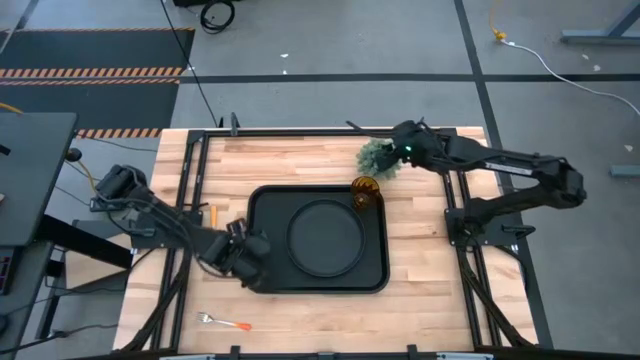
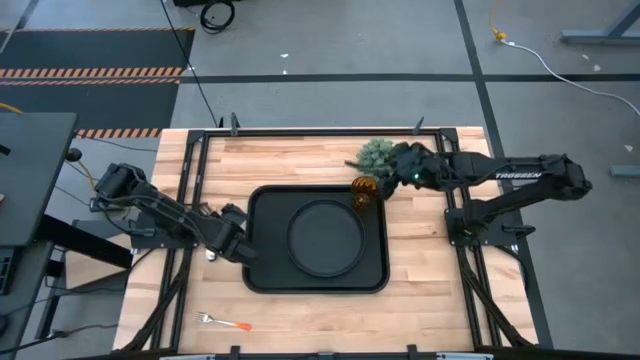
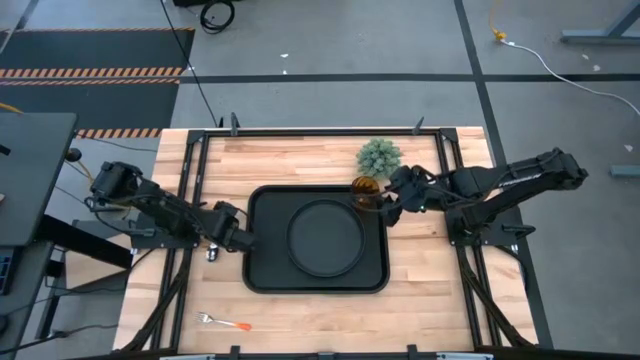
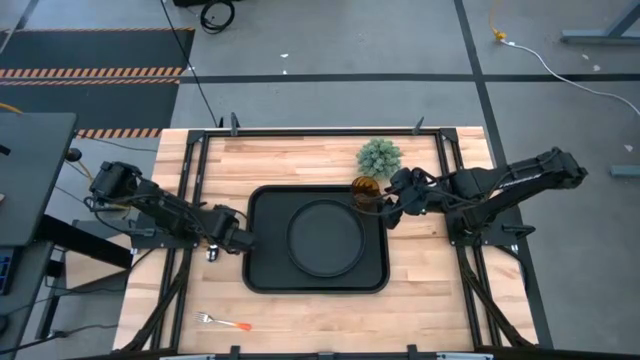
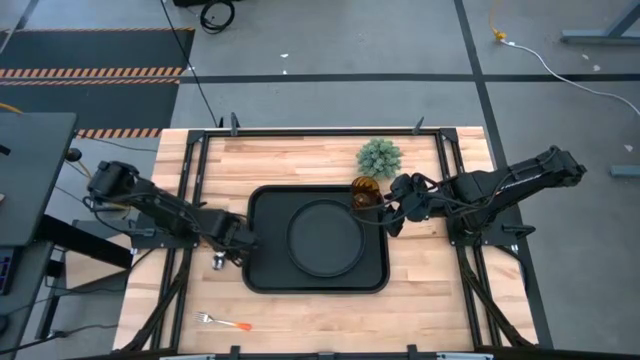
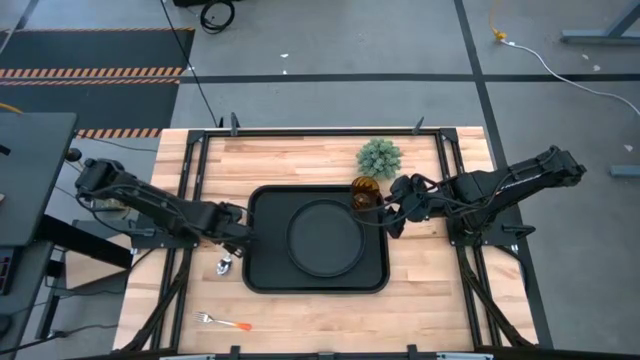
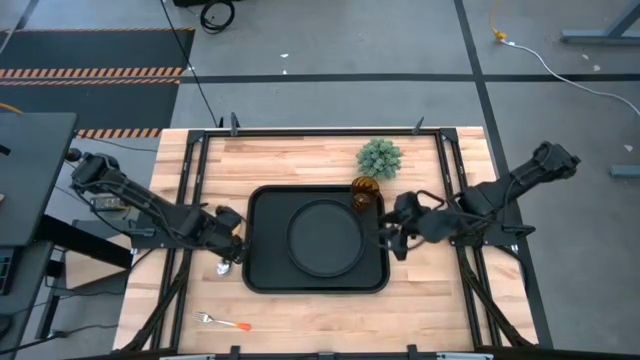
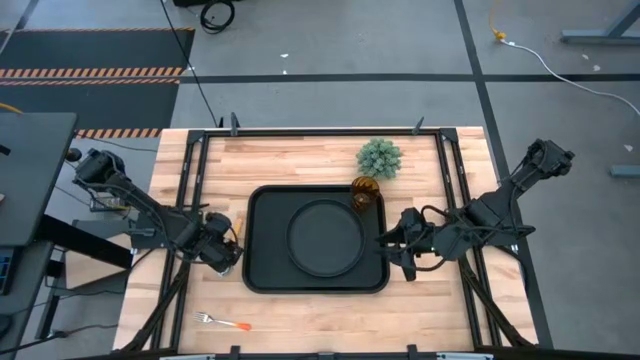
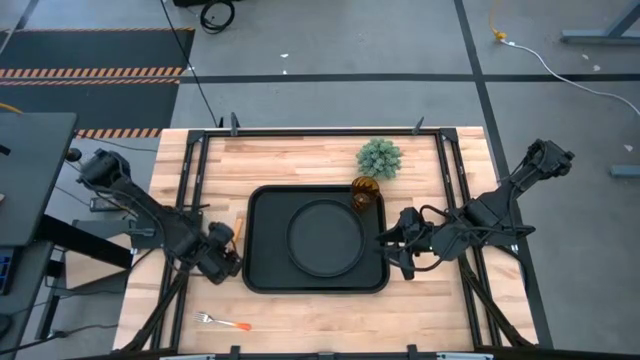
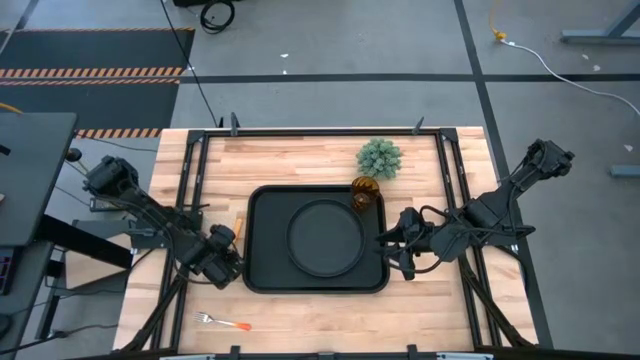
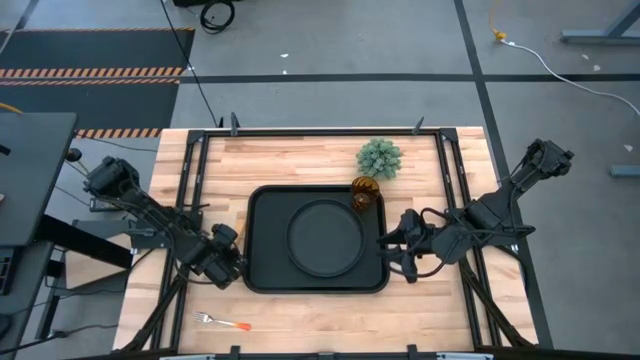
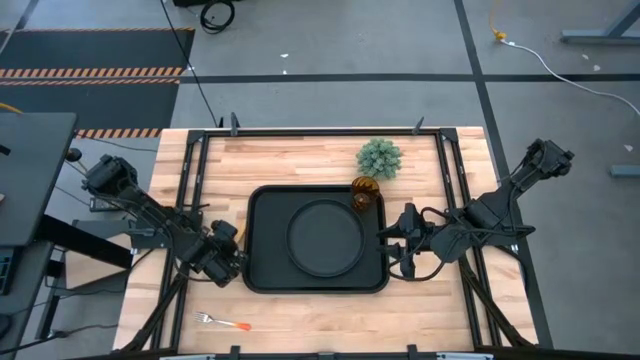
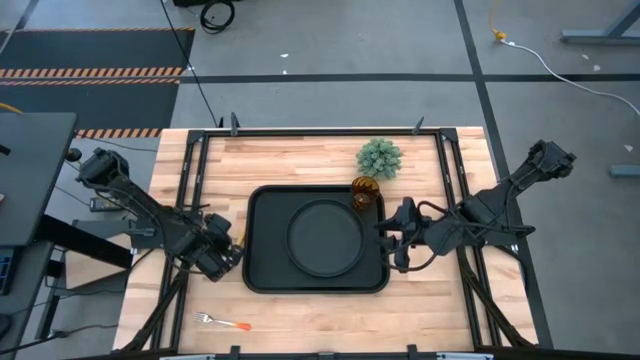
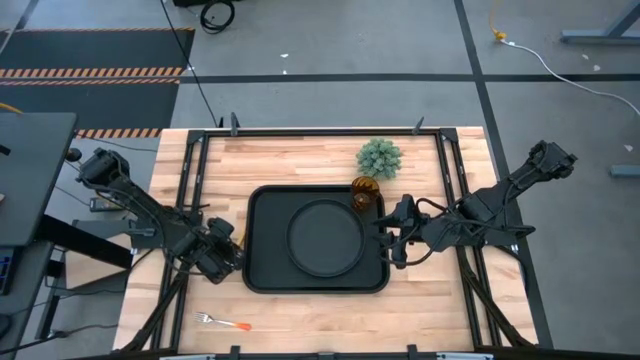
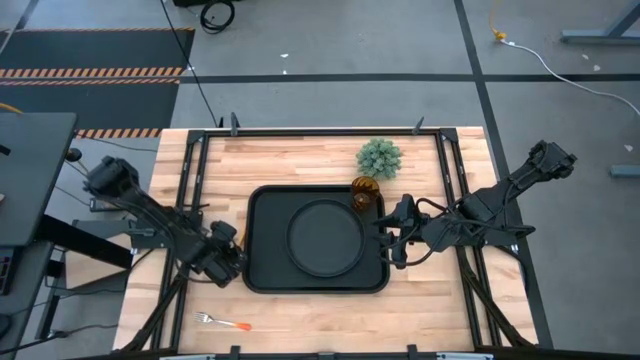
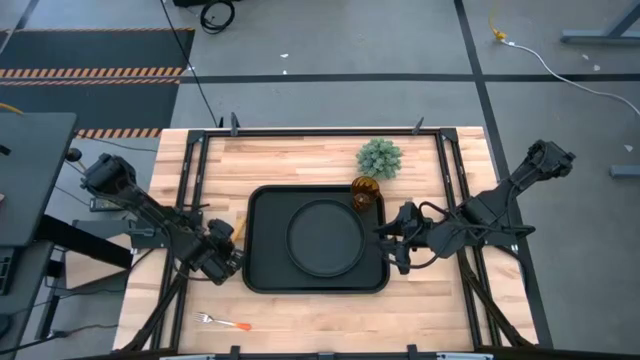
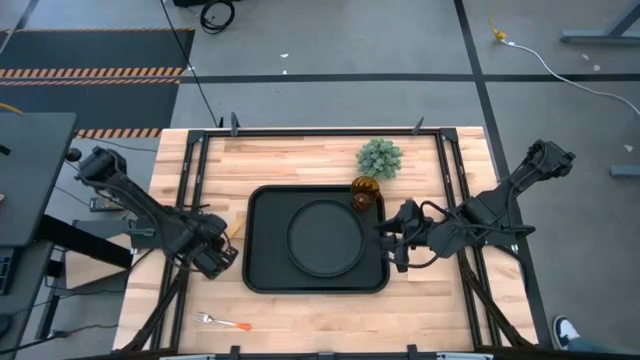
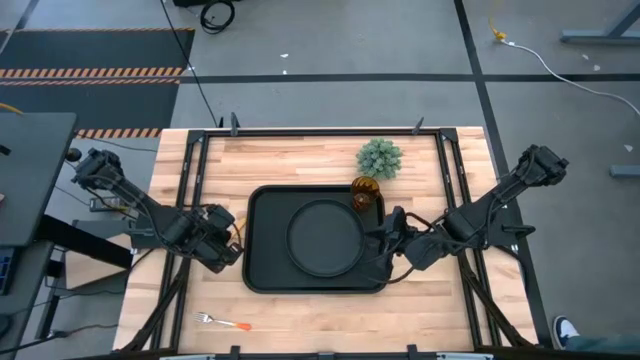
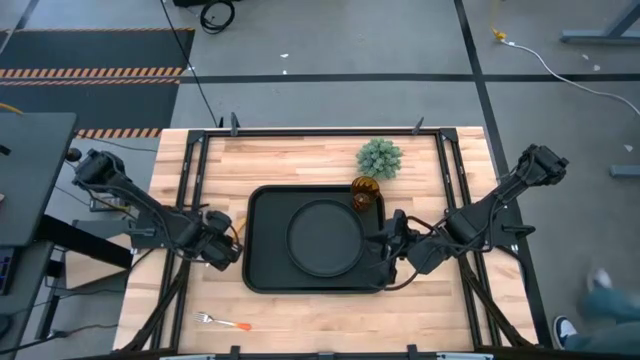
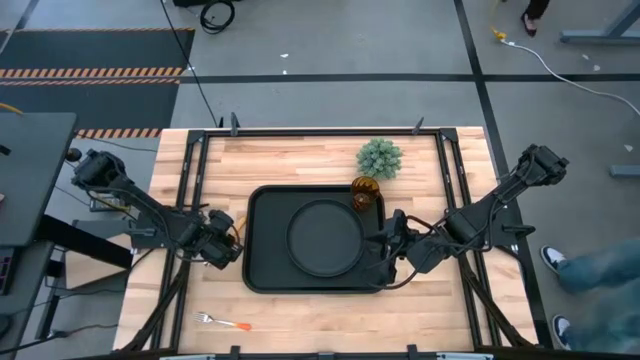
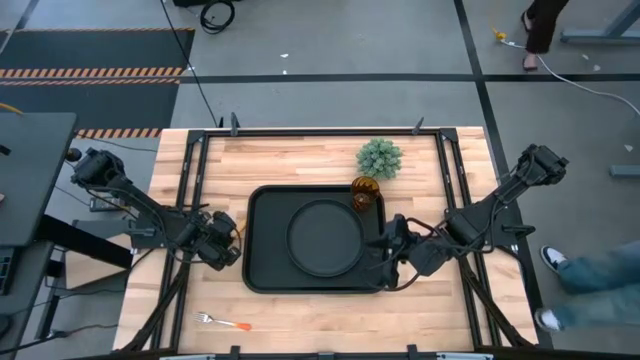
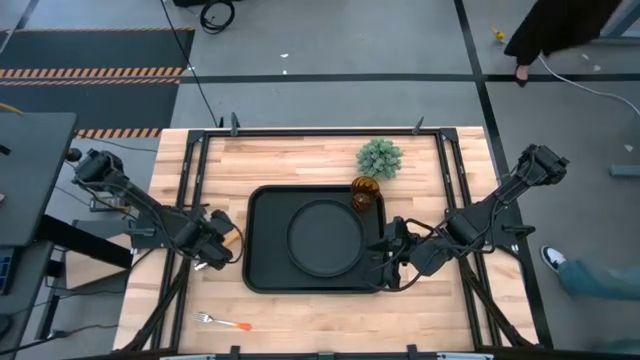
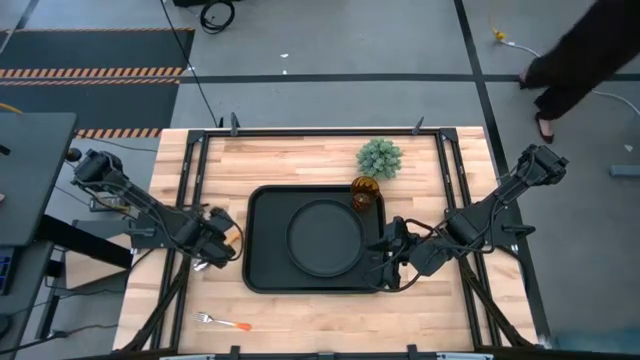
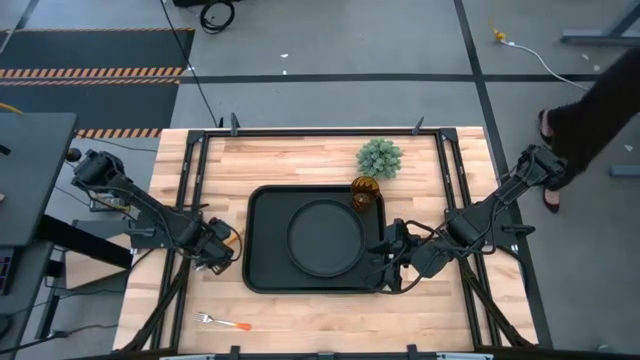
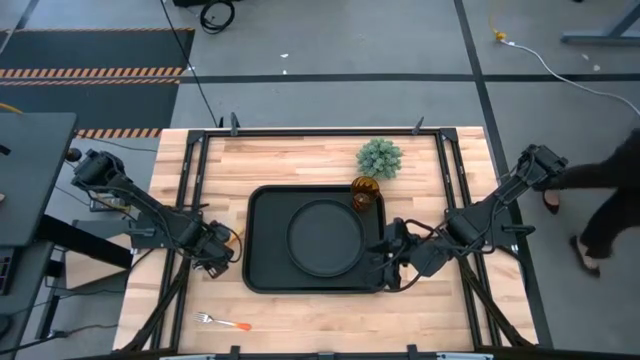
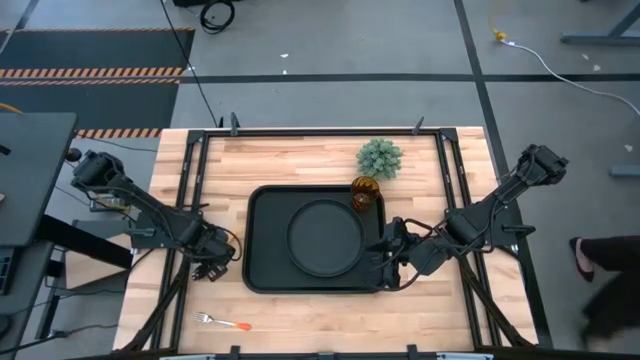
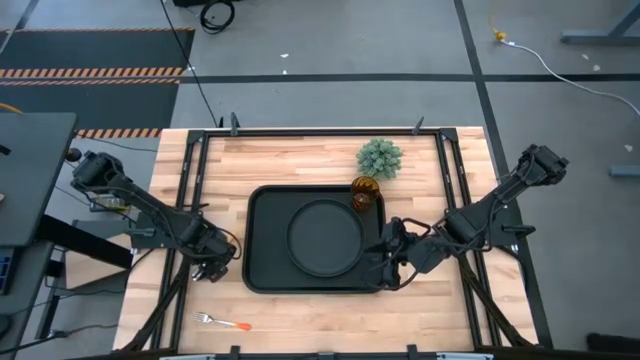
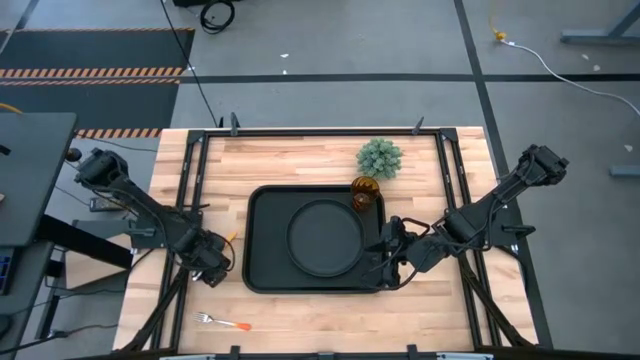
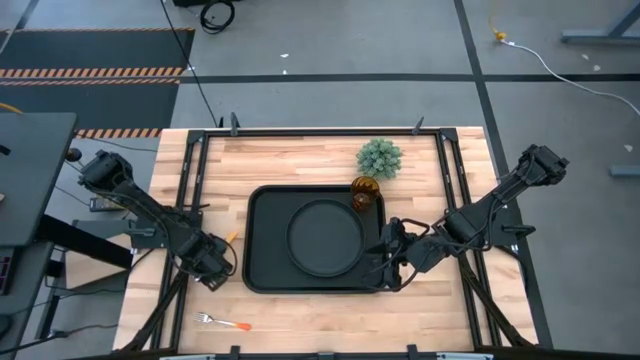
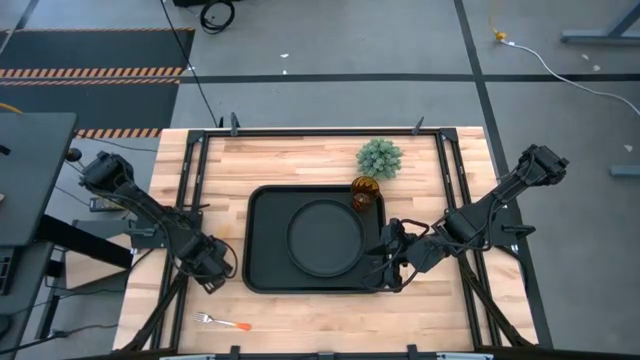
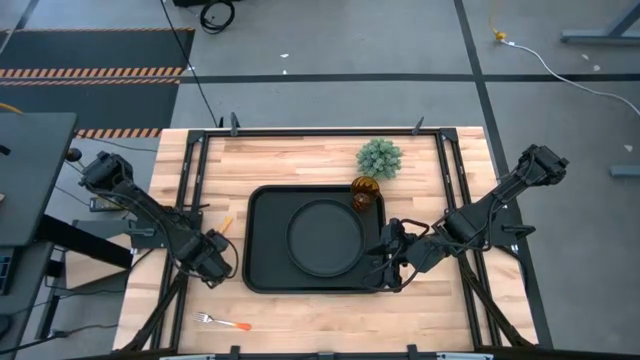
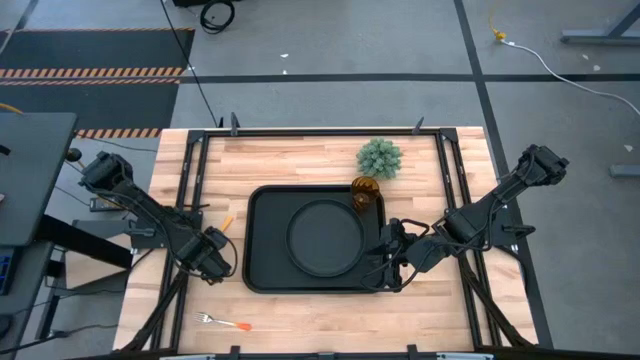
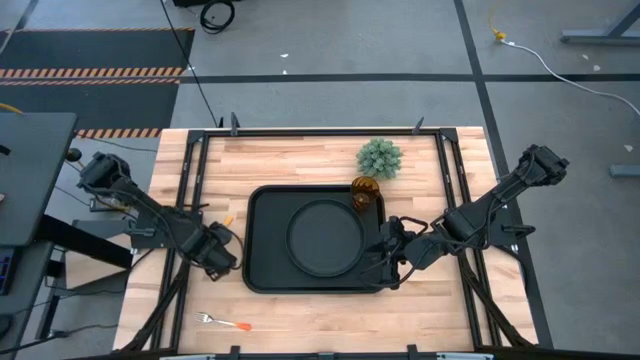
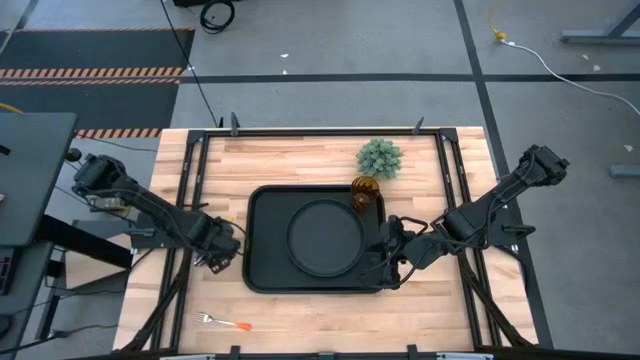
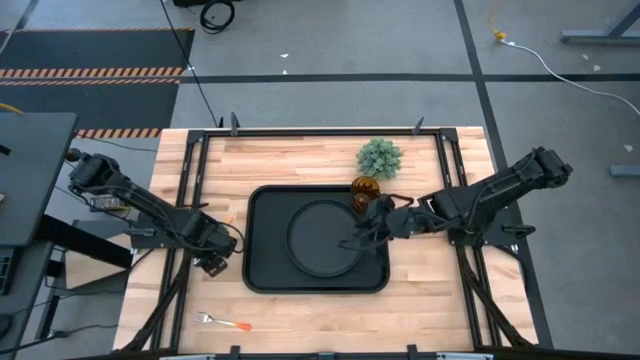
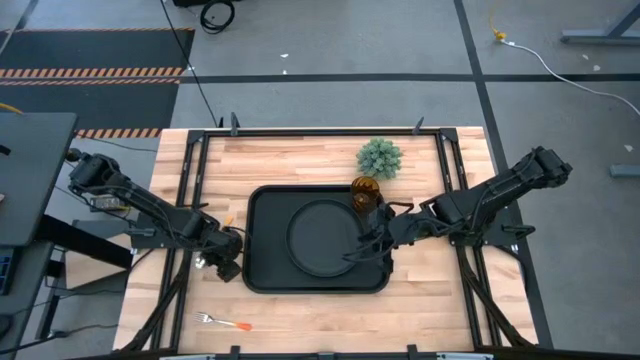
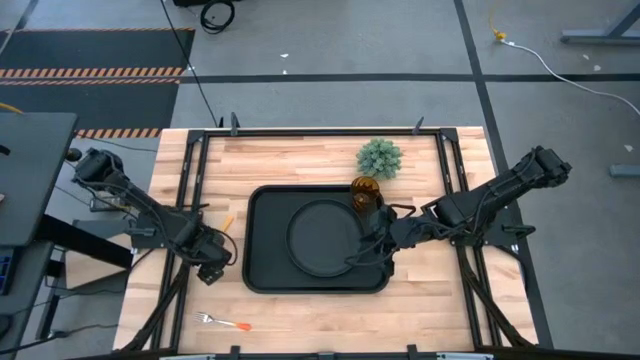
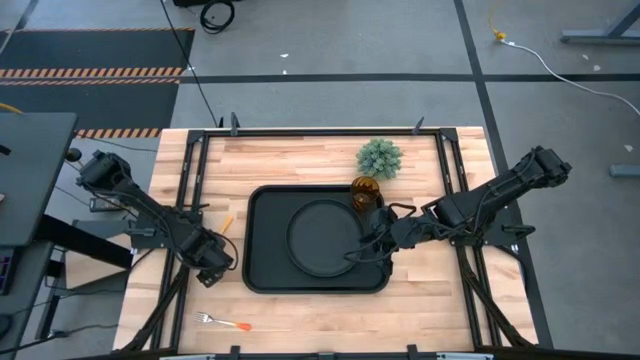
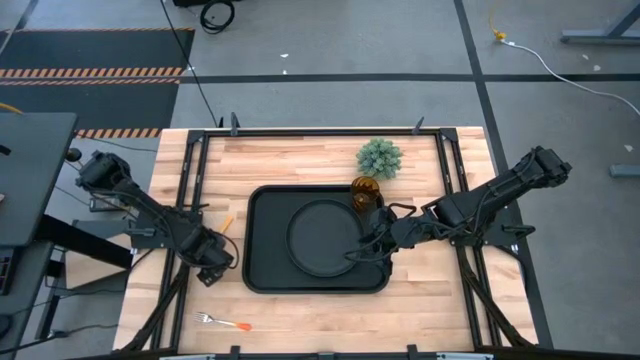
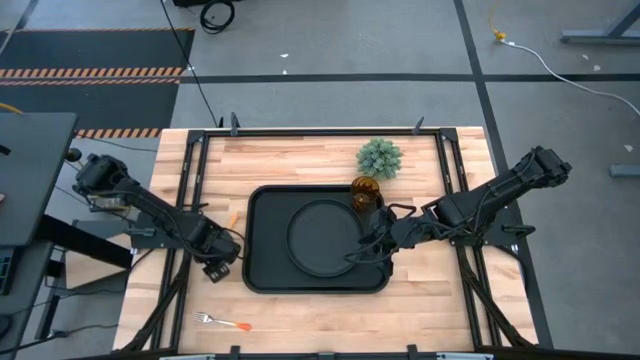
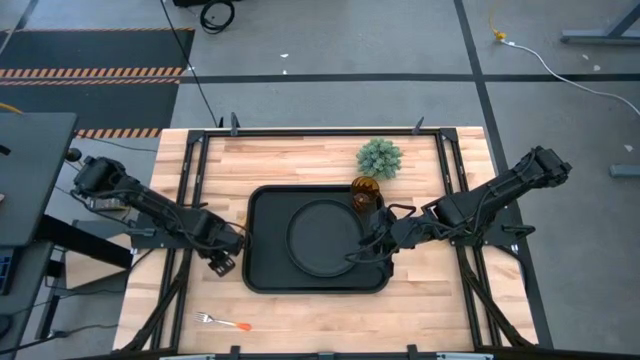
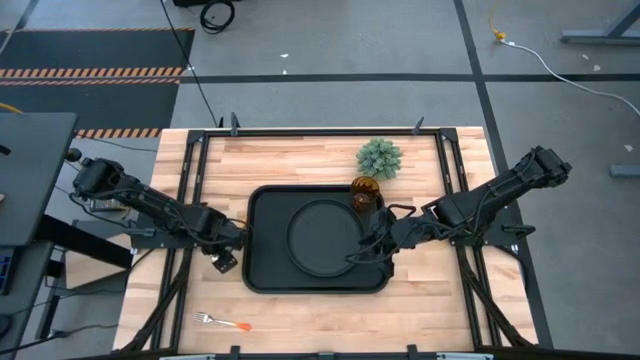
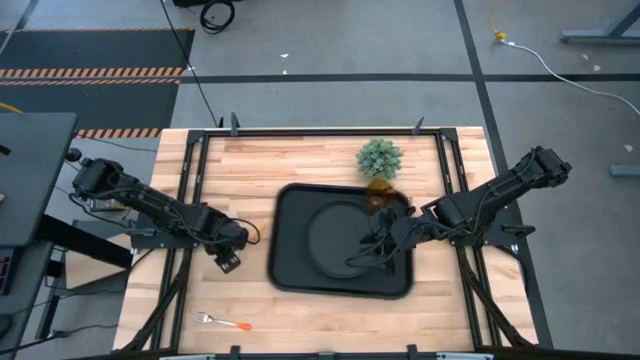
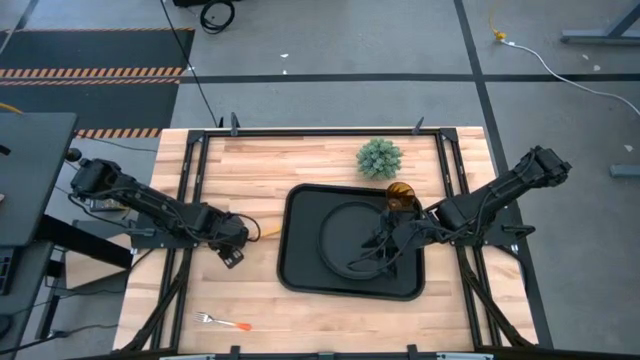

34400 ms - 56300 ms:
Task: Pick and place plate/cup/fork/spoon on tray
Put the yellow spoon on the black serving tray
